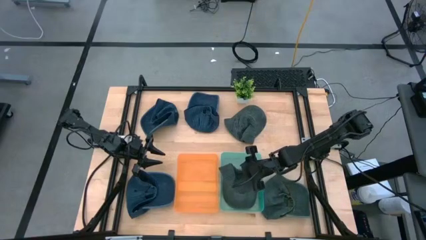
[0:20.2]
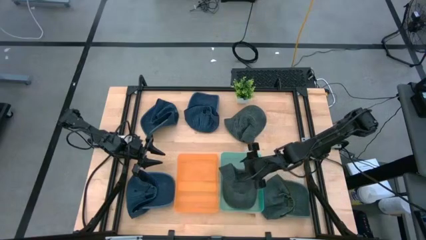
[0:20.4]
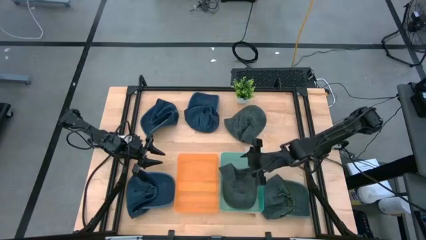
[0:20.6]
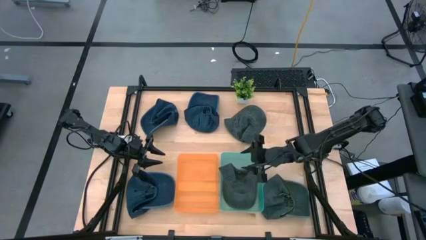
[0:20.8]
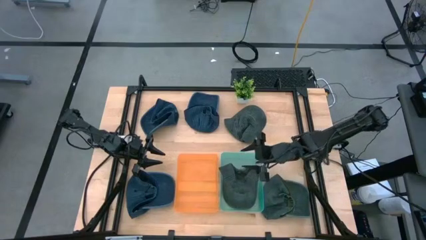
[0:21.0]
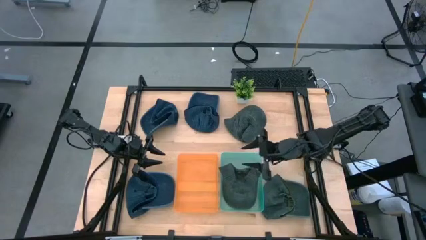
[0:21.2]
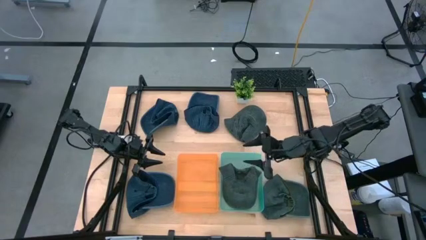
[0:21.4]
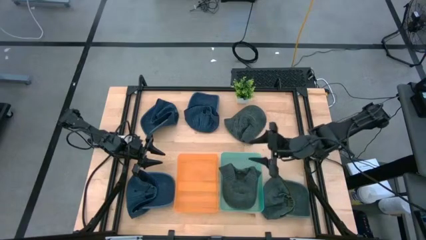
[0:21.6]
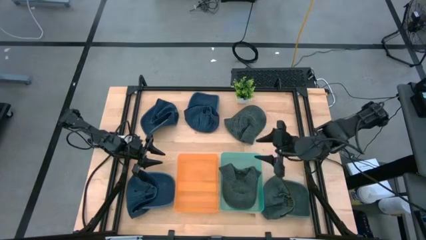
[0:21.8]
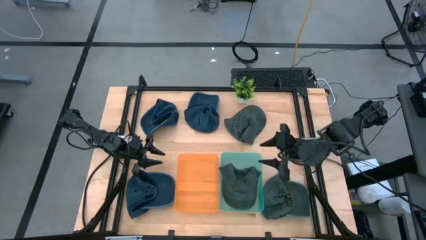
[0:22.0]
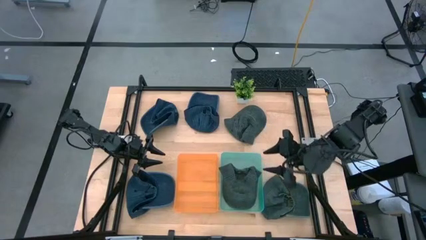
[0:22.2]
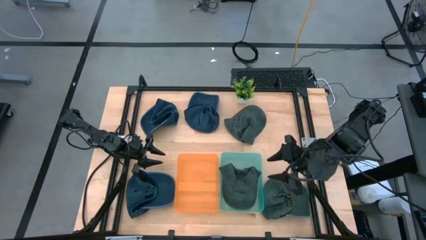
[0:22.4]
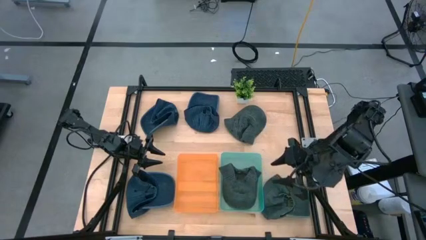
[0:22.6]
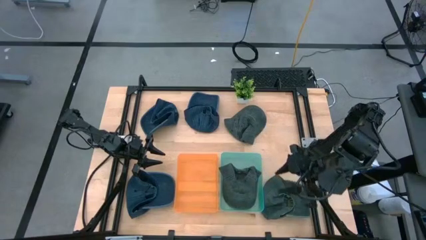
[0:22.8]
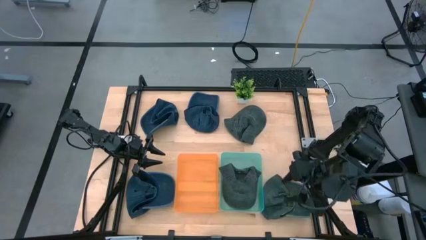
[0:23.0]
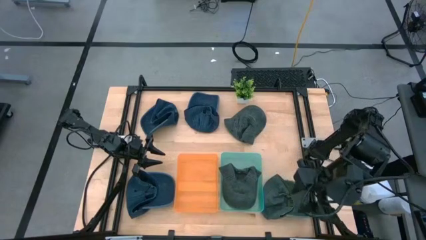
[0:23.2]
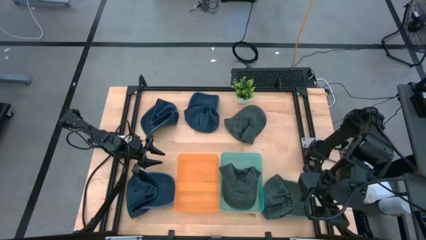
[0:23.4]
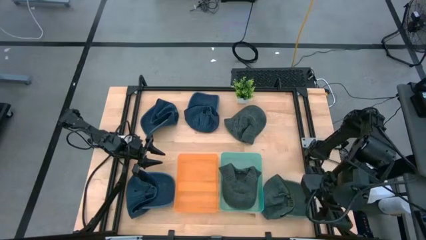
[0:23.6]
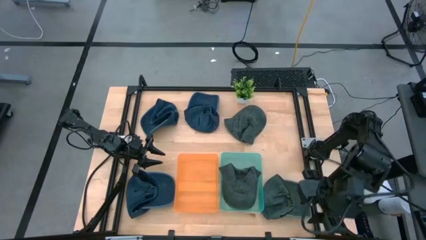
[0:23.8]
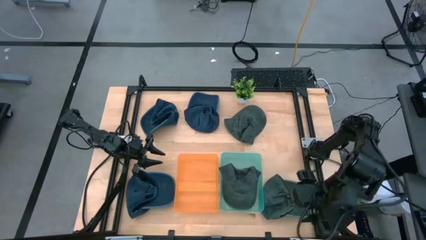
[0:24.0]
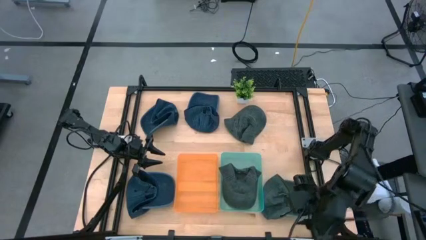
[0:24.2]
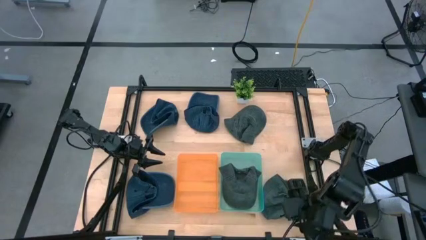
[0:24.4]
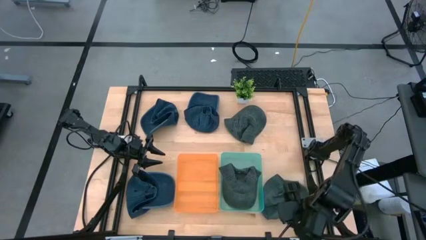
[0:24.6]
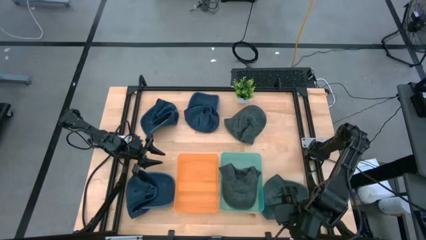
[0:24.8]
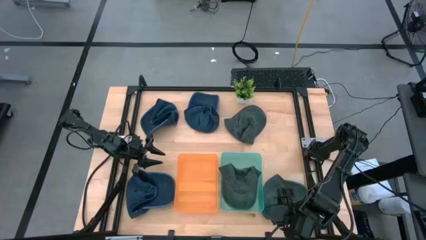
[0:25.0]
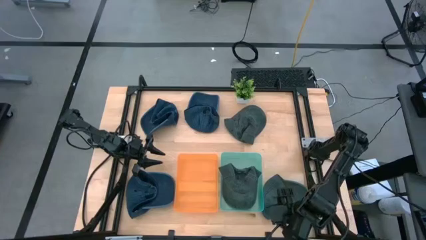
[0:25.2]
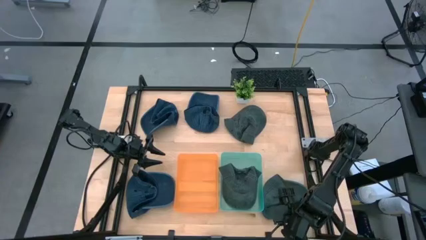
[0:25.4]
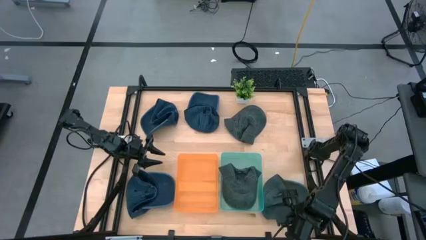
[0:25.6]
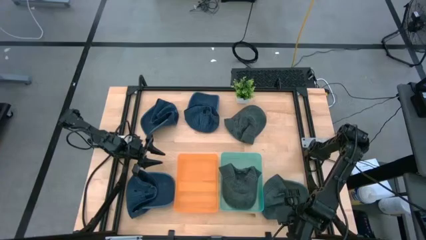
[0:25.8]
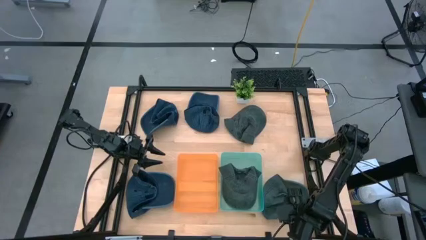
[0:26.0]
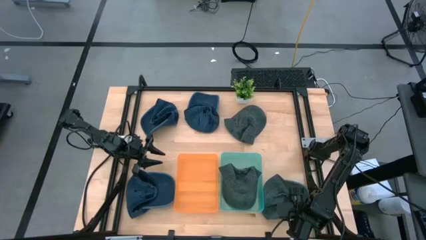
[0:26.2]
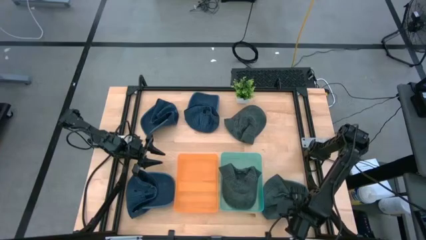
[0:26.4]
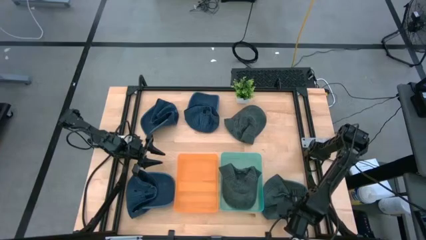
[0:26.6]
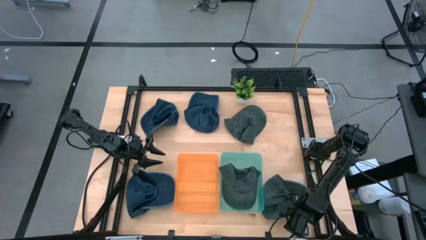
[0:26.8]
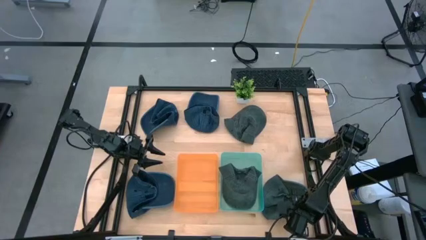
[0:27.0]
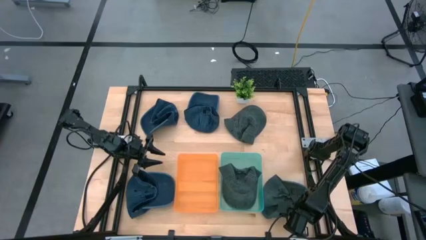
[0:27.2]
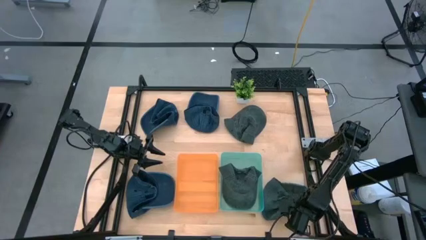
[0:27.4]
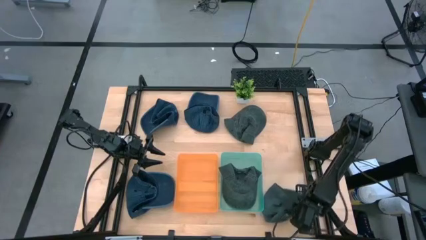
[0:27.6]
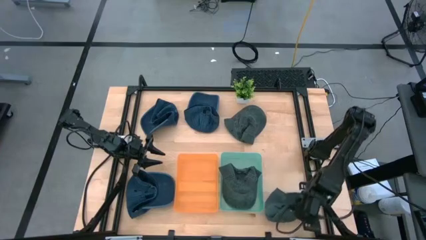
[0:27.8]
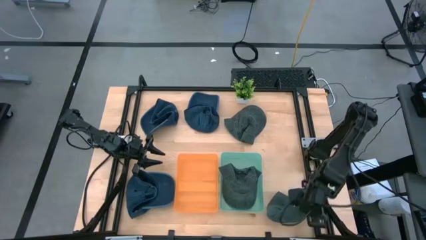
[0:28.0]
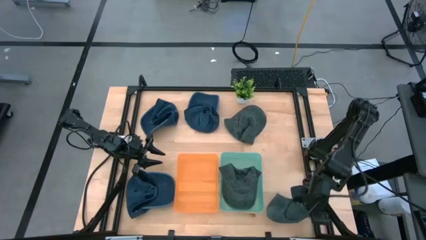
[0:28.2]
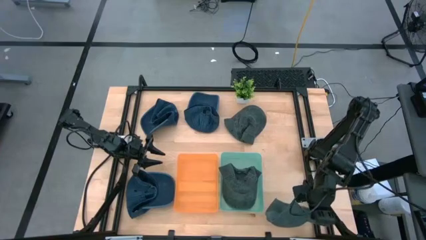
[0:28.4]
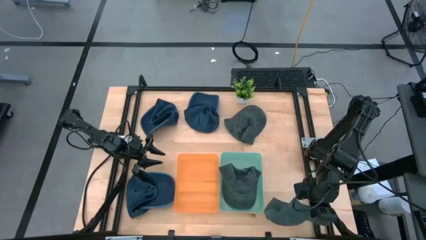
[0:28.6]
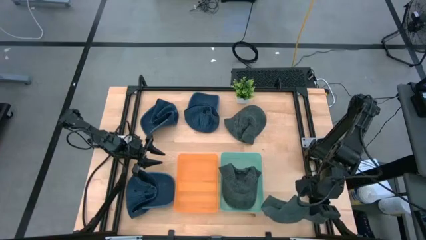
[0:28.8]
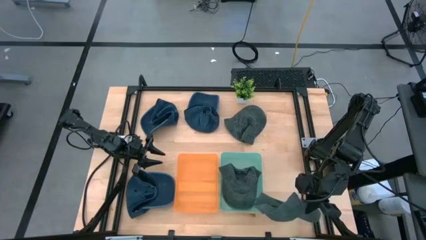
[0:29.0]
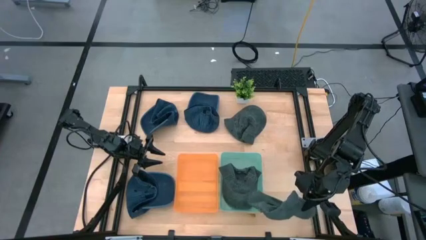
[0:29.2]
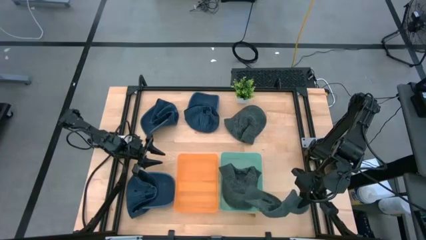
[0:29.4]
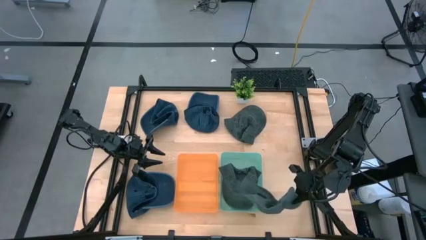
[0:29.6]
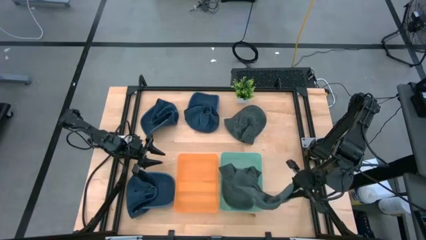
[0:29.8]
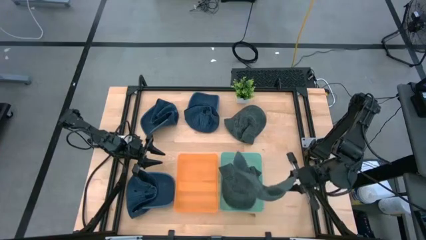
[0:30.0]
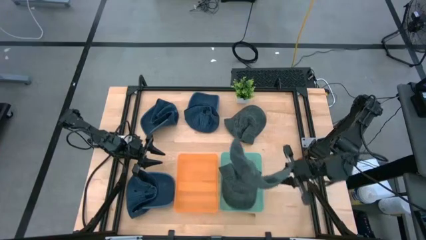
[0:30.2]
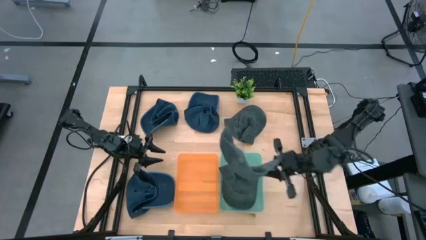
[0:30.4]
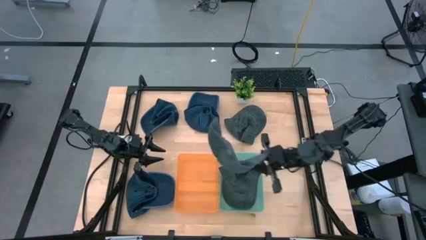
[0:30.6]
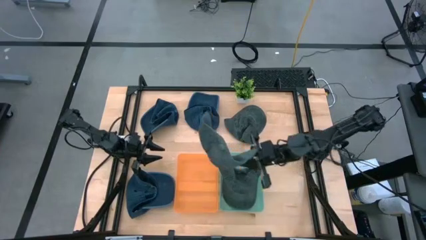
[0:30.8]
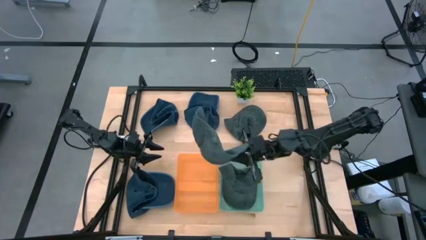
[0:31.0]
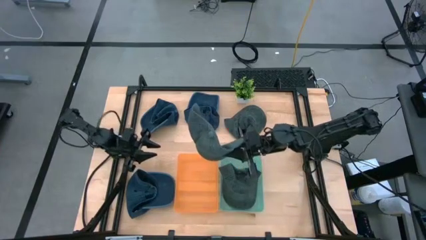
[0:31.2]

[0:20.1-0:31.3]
Task: Pick & Place hat
Put the bottom black cap into the green bin

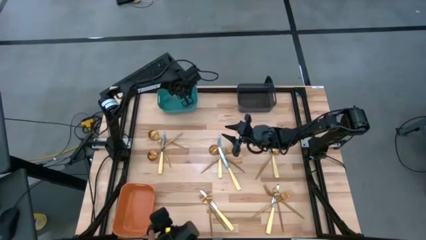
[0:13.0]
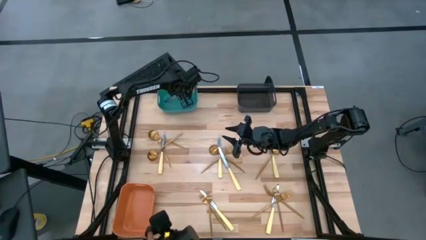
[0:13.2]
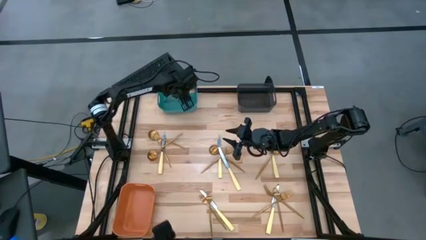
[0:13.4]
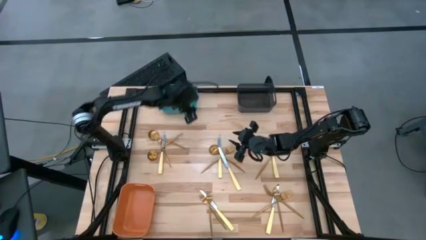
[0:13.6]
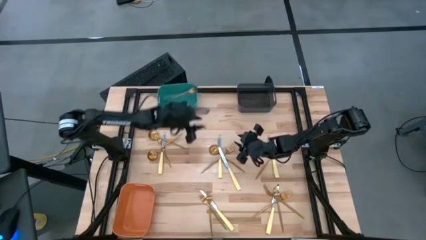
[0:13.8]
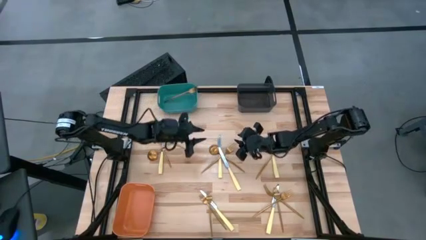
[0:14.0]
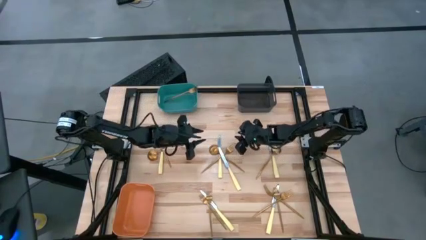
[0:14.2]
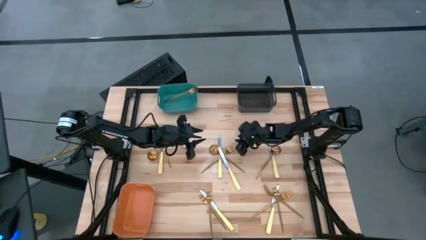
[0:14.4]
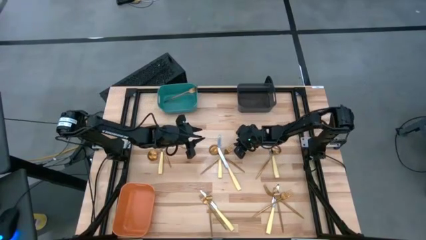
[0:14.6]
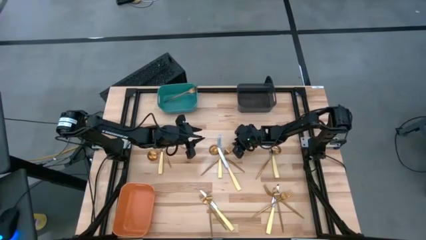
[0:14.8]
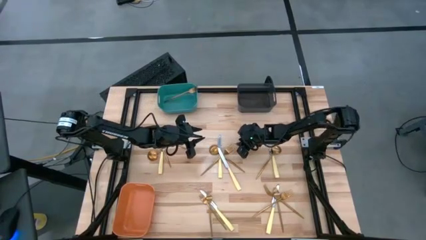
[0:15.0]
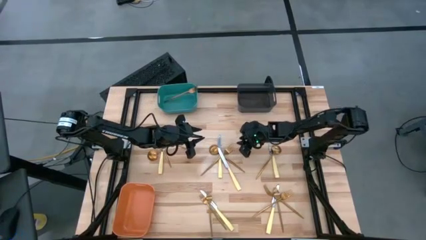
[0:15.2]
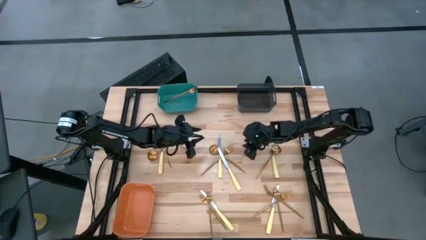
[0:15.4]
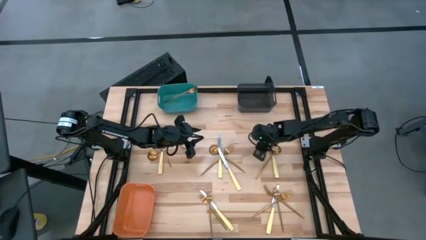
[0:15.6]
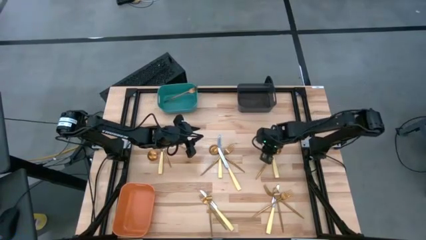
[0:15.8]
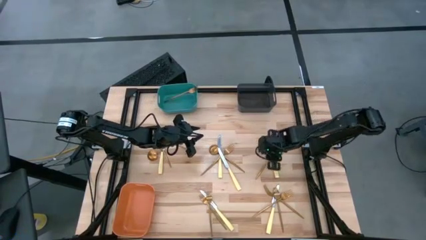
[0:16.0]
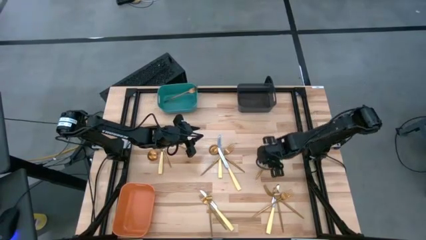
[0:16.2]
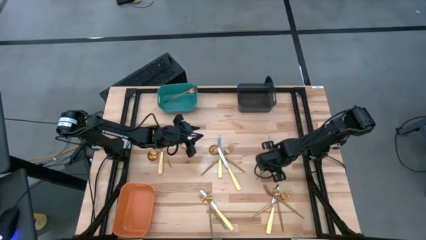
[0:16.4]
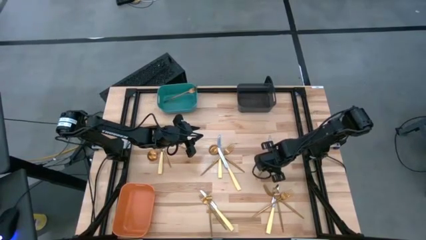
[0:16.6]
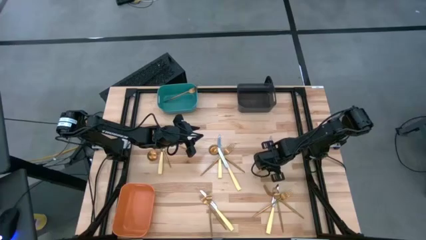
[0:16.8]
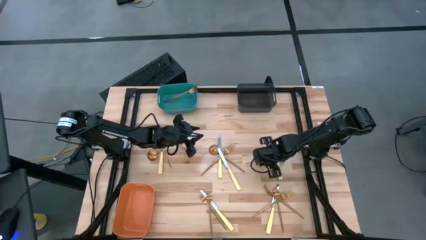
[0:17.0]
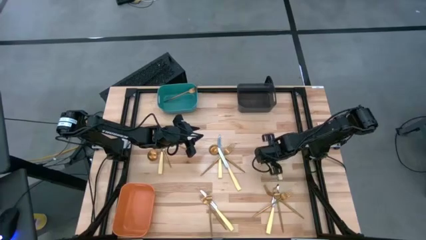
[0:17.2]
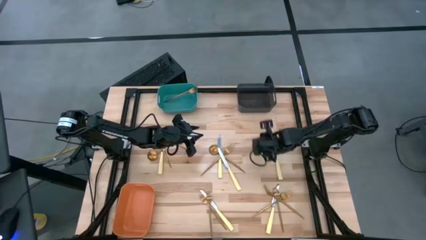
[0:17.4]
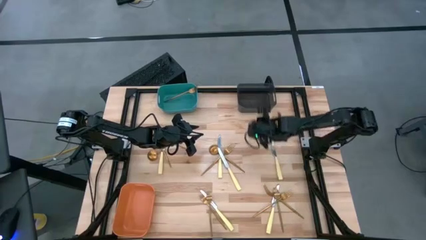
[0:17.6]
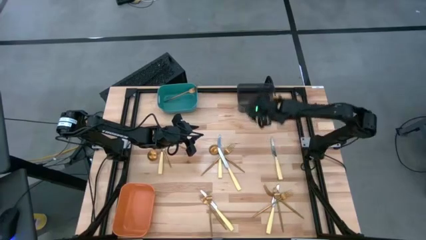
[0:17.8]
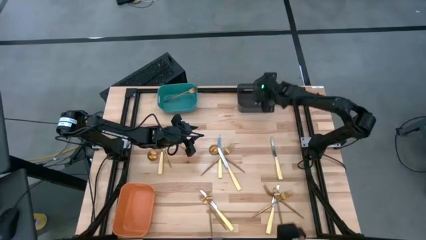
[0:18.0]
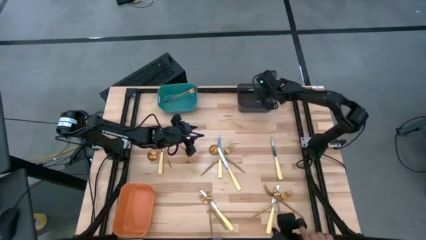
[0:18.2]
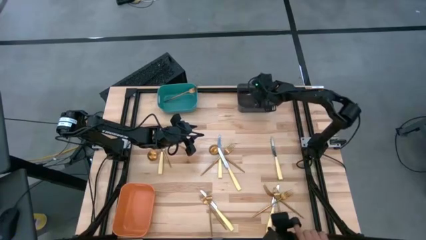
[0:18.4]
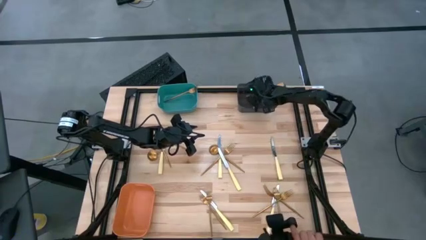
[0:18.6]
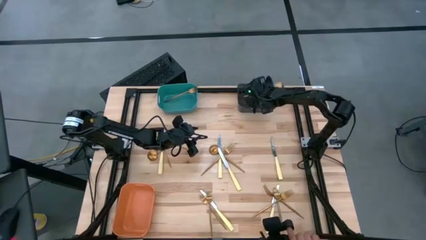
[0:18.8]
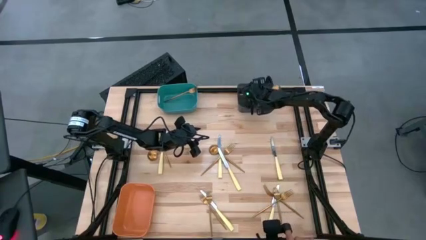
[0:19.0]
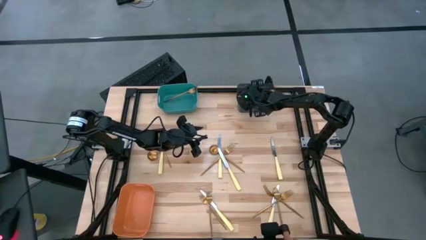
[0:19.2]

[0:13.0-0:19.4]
Task: Sort silverware by color (type)
Put the gold spoon into the black bin
